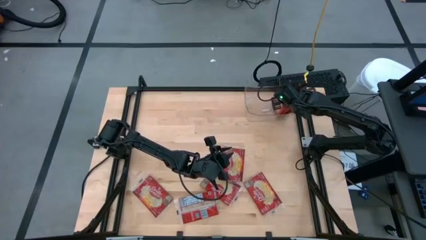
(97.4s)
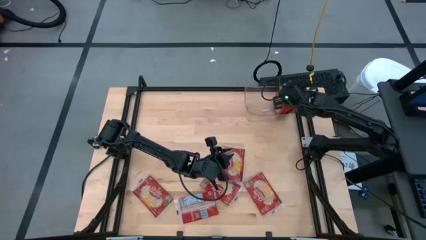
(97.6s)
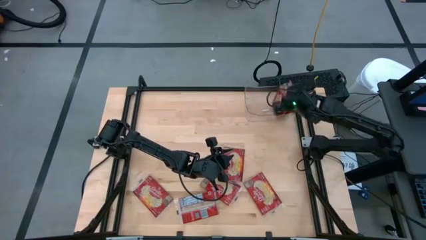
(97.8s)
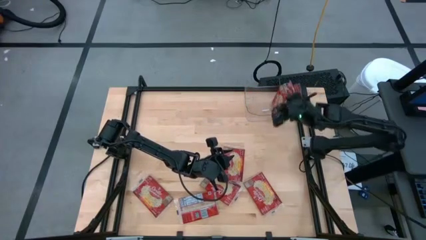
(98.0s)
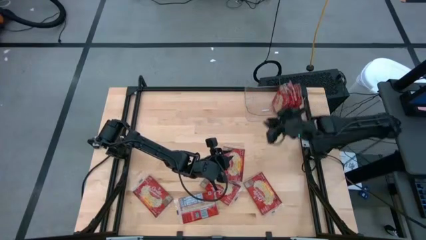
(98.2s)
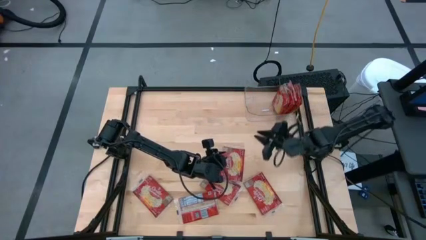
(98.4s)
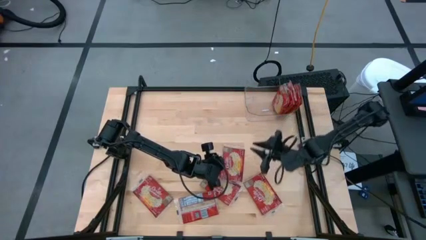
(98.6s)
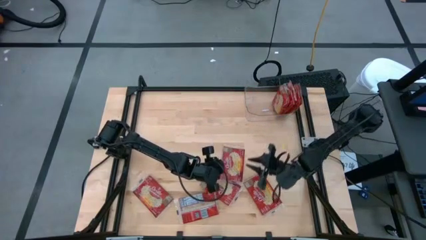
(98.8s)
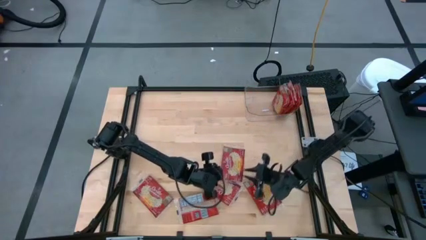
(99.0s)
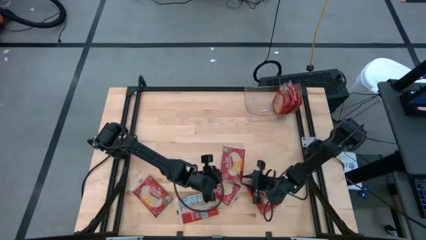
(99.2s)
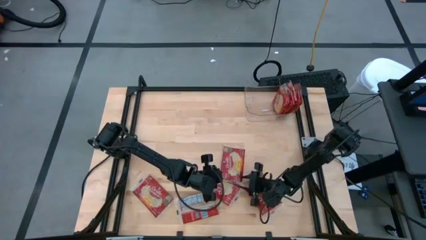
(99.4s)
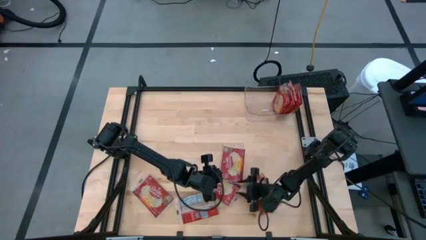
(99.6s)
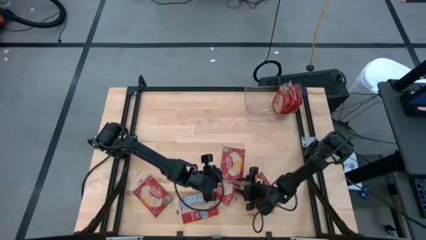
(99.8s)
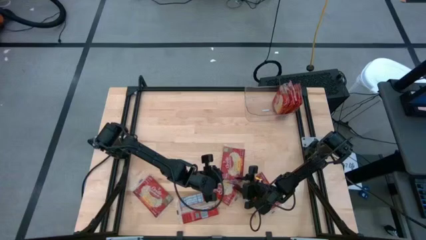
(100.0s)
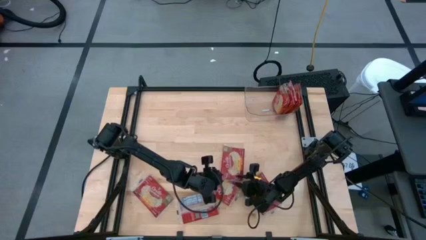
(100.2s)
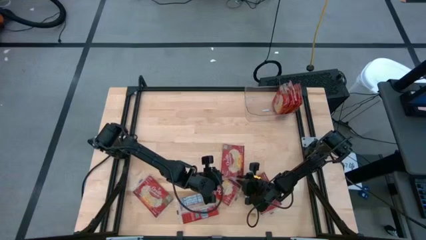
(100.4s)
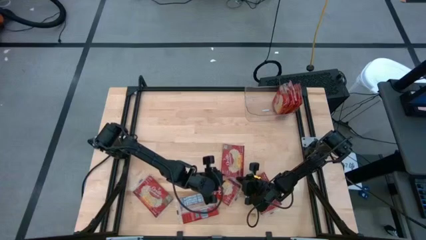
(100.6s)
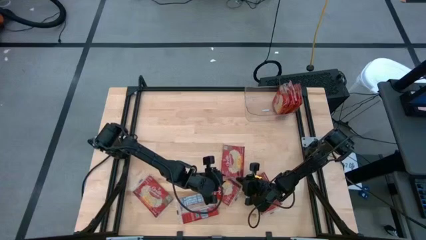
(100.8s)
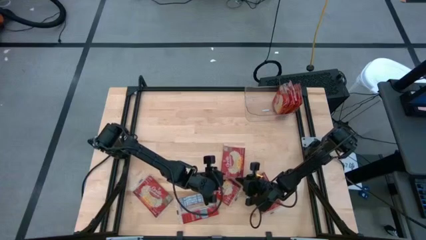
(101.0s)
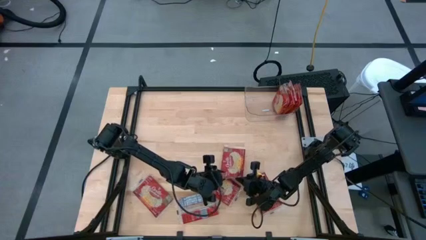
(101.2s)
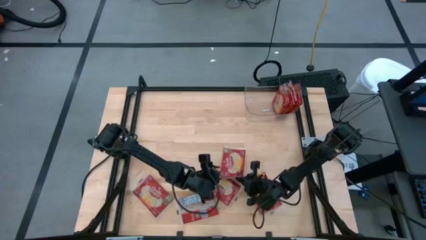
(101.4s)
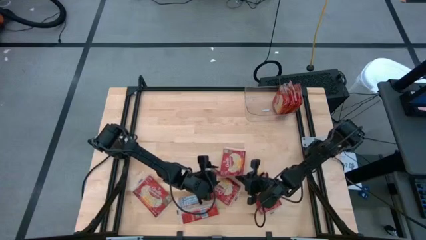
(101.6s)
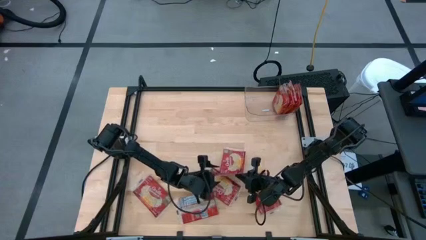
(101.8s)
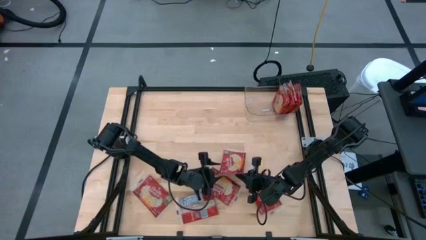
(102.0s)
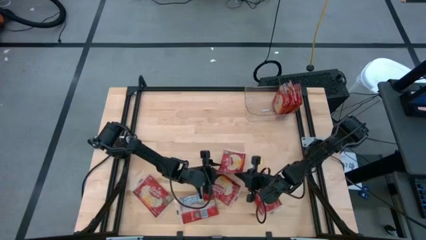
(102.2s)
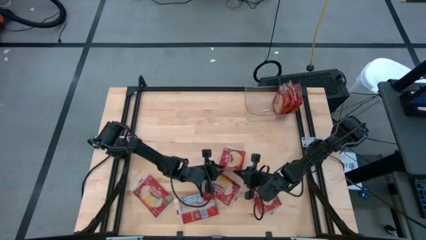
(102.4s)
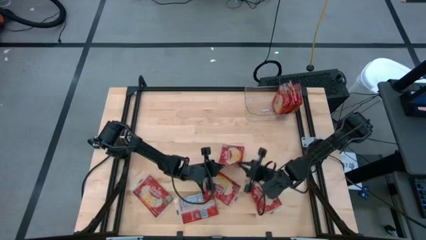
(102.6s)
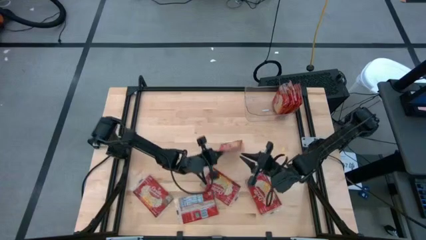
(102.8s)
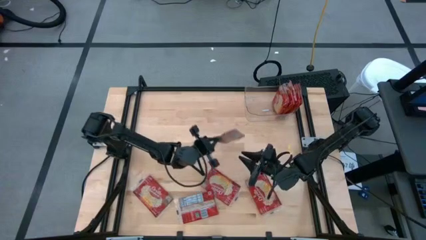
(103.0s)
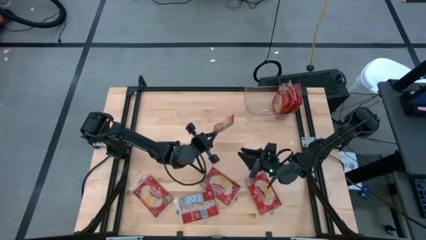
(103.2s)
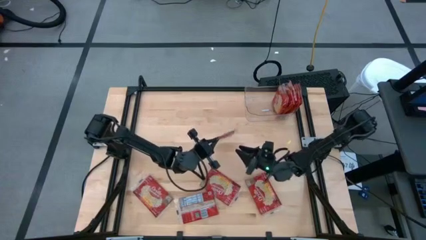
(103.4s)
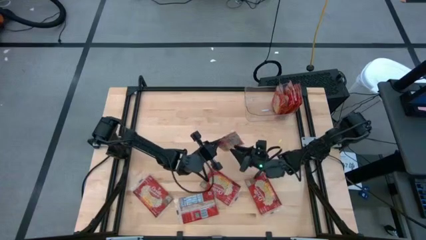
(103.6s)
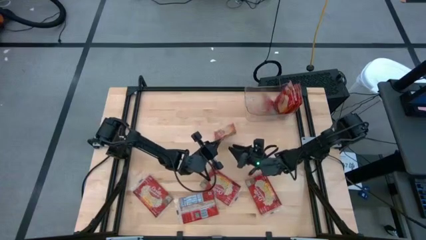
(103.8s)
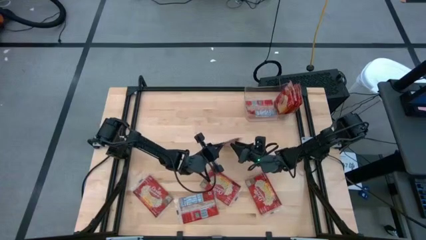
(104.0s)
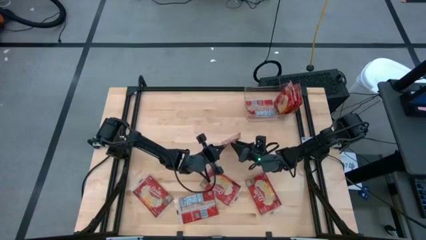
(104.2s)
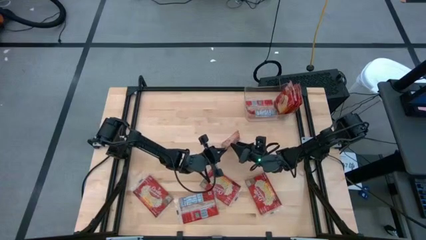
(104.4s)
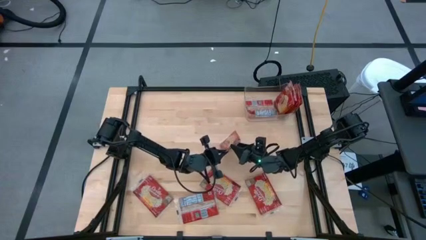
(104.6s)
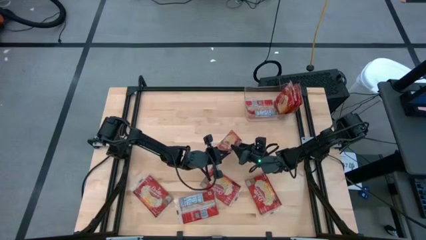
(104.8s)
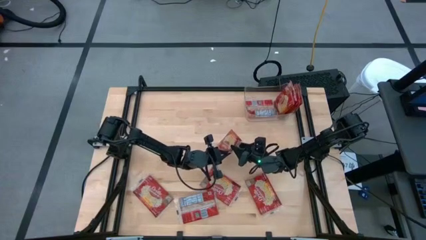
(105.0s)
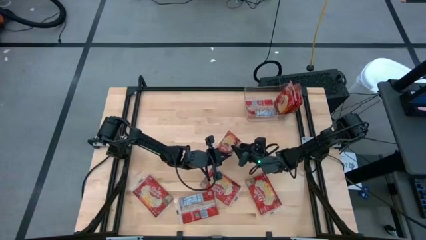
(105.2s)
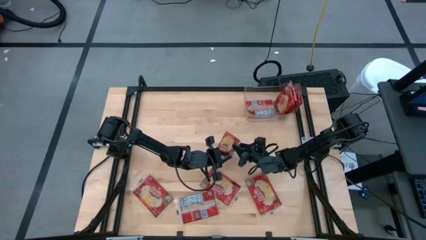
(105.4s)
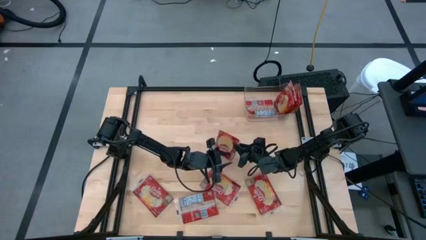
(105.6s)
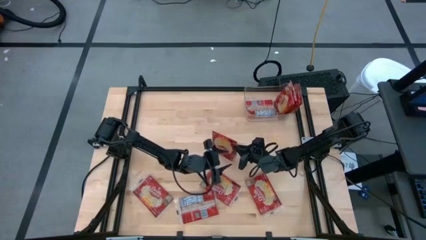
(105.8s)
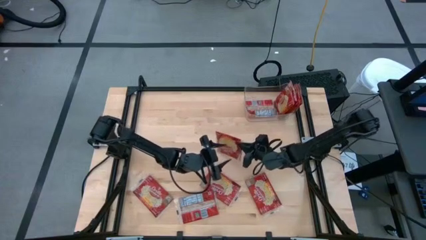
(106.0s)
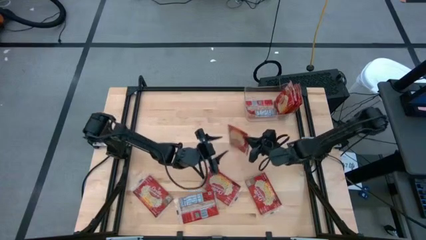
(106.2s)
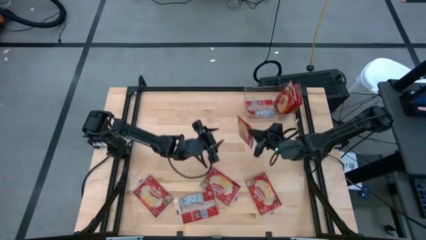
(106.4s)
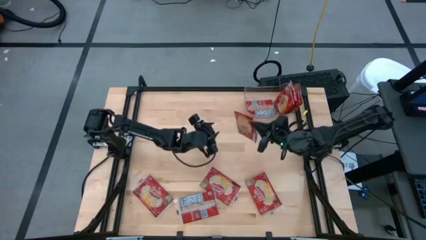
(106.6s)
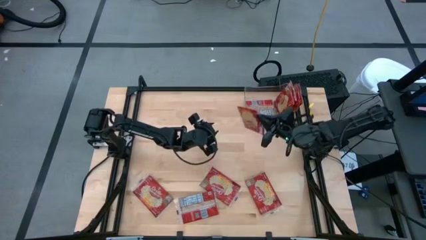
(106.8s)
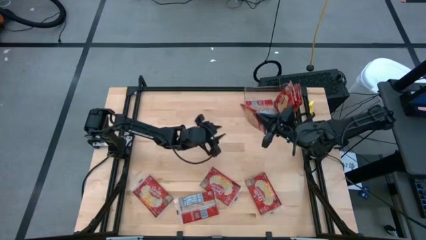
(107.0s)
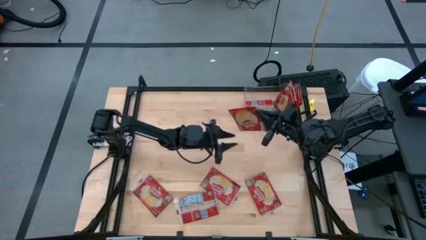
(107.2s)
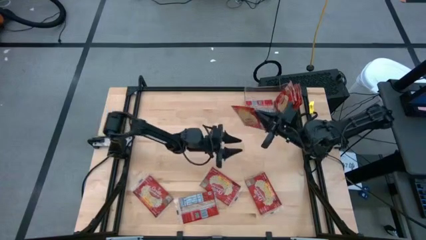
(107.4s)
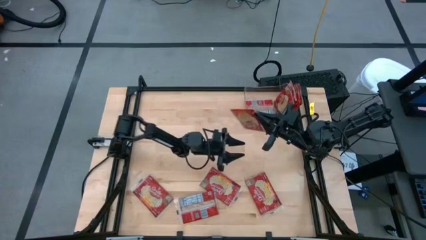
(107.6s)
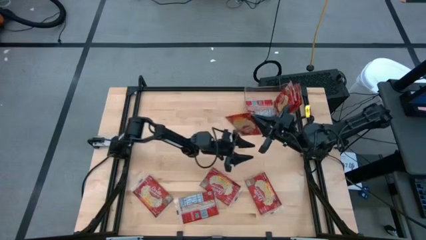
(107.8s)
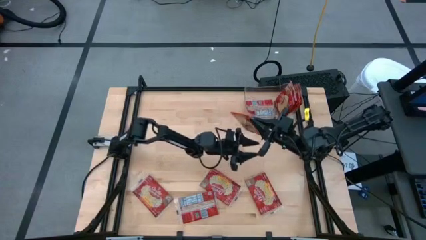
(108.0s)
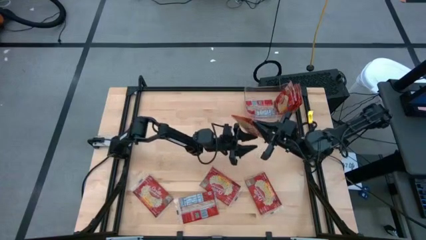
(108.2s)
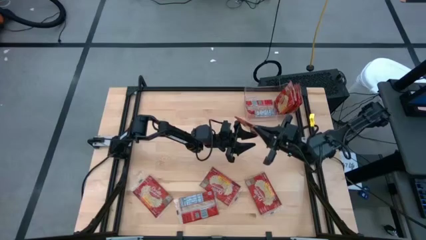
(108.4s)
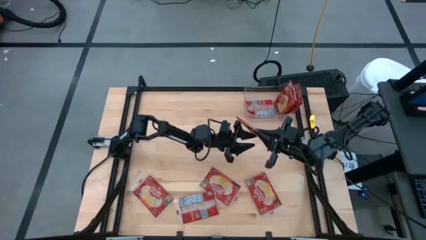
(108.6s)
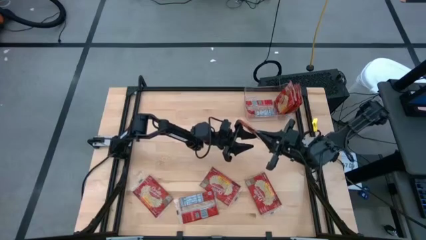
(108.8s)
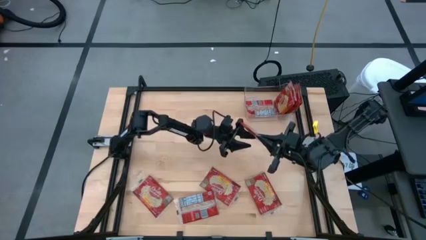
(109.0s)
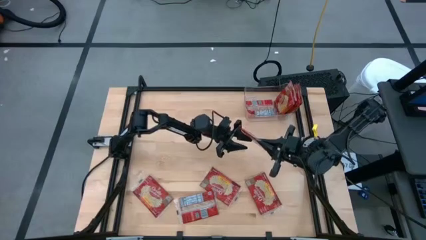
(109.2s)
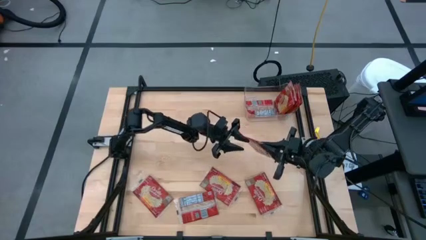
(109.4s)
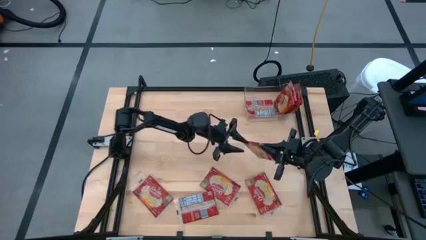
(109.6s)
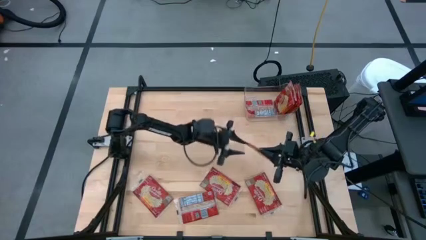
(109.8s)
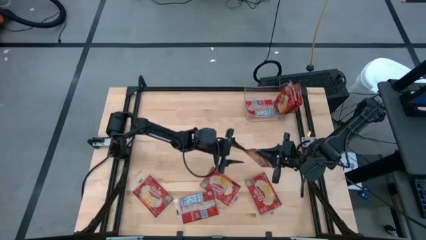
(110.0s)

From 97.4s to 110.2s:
Task: Sort popcorn bags into baskets
Put the red popcorn bag into the transparent bin

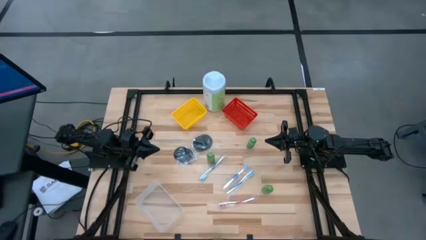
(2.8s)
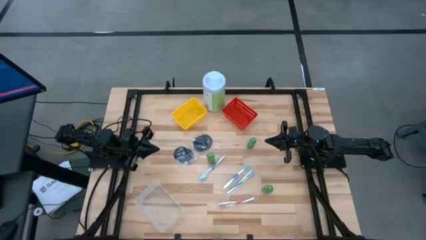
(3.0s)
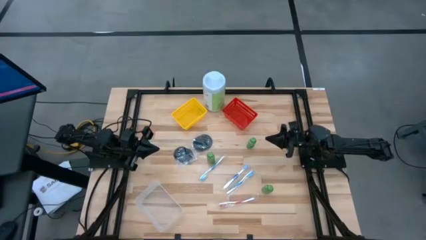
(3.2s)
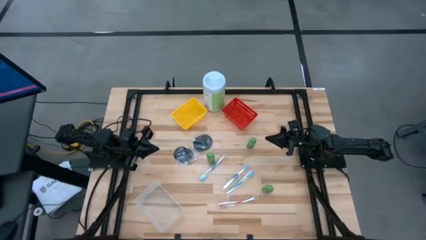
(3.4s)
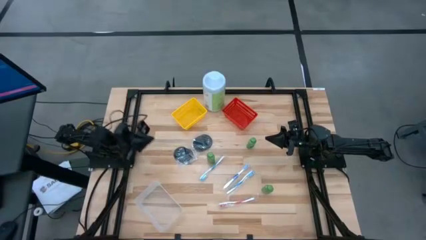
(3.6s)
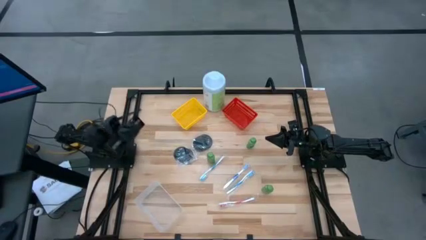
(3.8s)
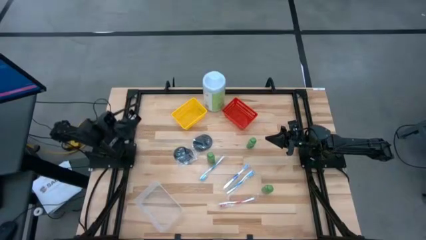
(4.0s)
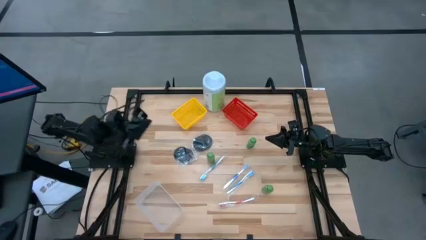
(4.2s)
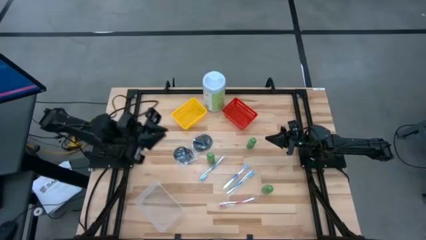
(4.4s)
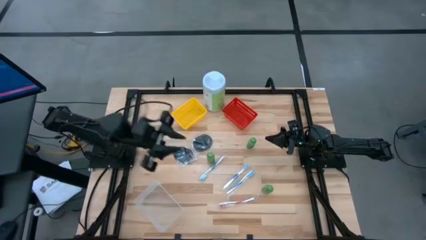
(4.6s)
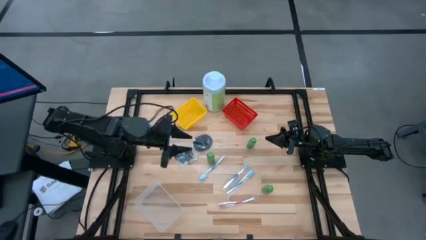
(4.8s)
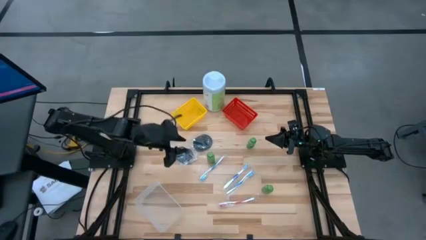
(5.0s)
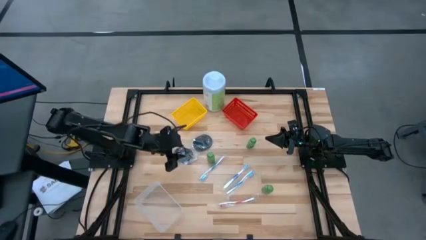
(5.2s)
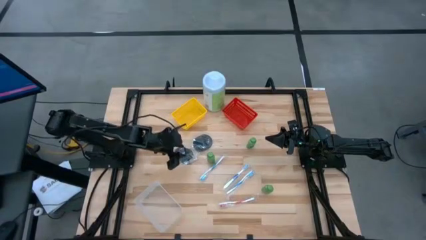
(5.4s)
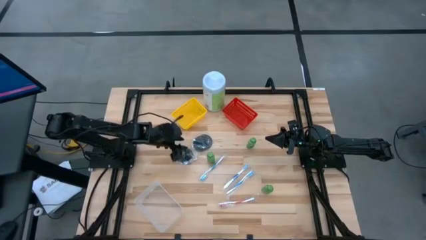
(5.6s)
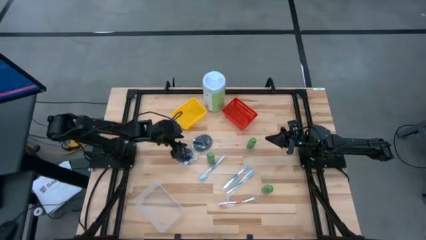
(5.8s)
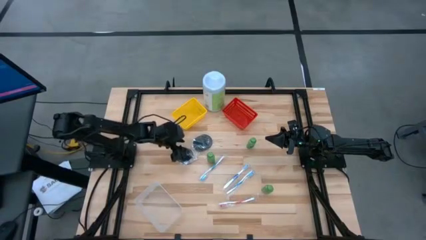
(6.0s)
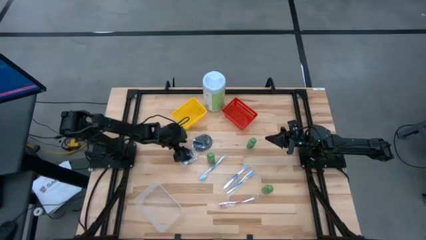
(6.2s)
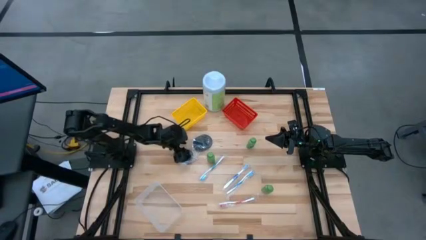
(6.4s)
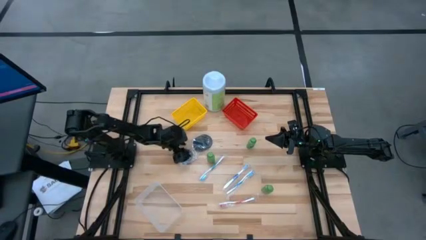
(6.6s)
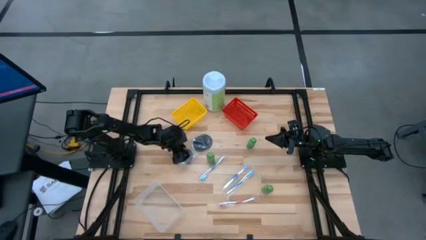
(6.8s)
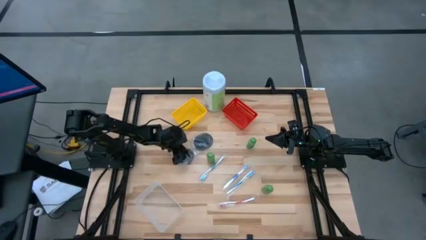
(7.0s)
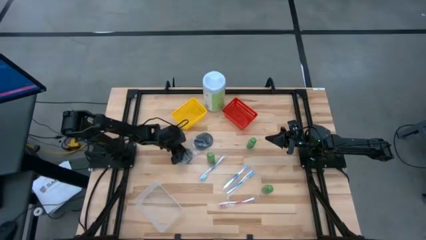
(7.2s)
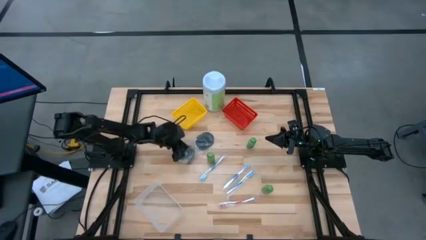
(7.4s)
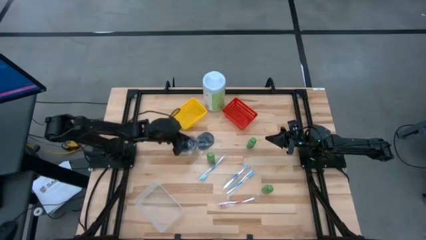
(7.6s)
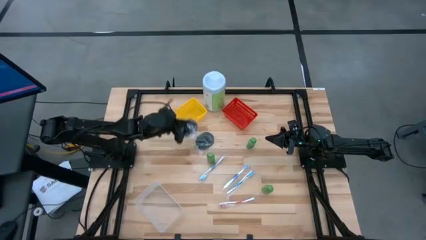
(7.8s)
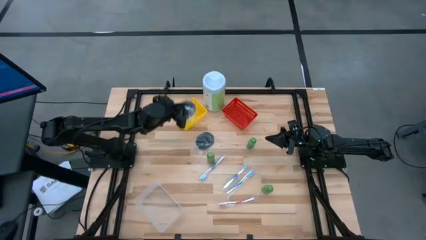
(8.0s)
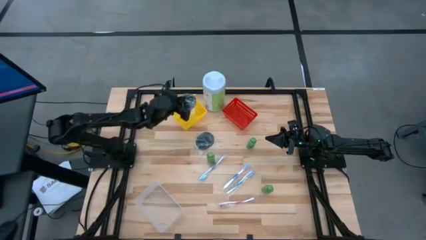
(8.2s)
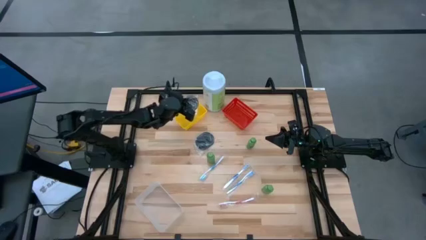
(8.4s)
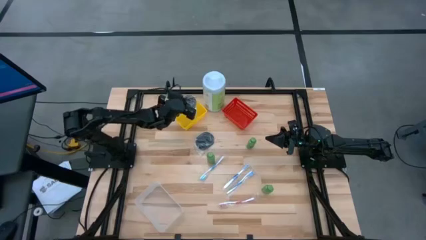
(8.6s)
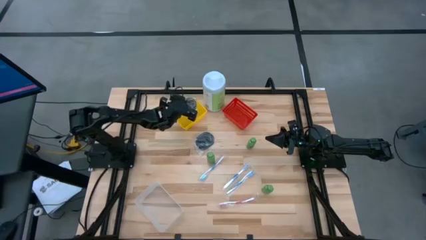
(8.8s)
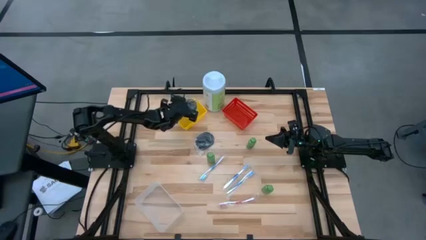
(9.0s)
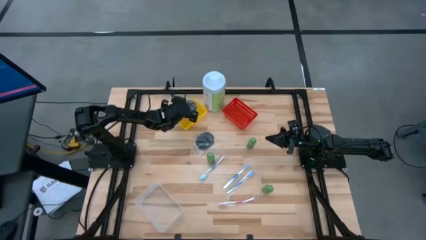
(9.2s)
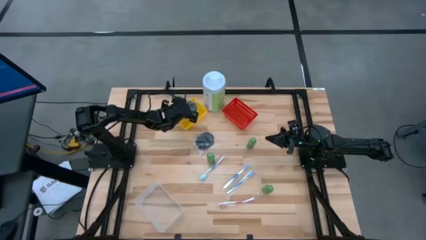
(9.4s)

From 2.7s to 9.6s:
Task: Pick & Place Travel size toiletries
Put the bottom black hairbrush into the yellow bin
